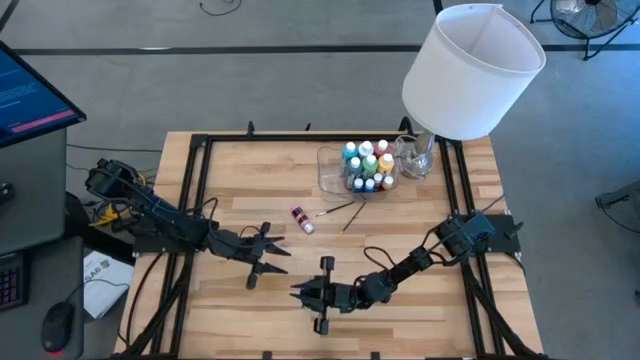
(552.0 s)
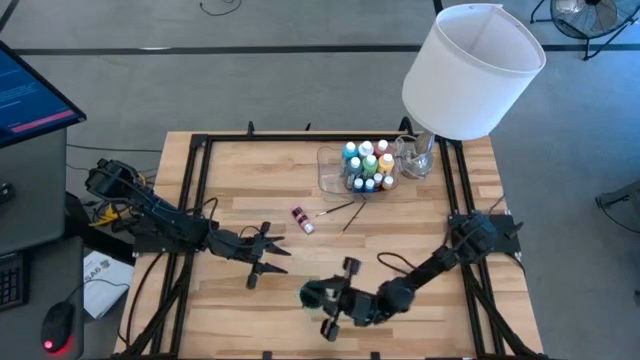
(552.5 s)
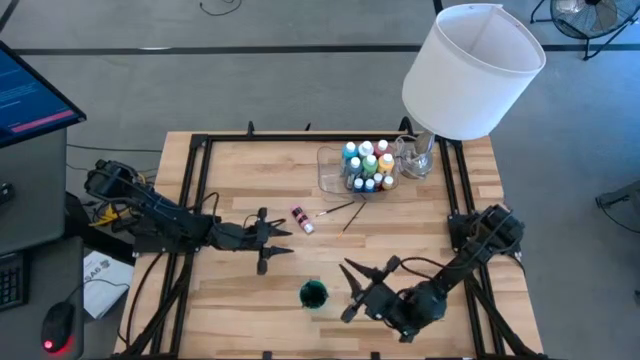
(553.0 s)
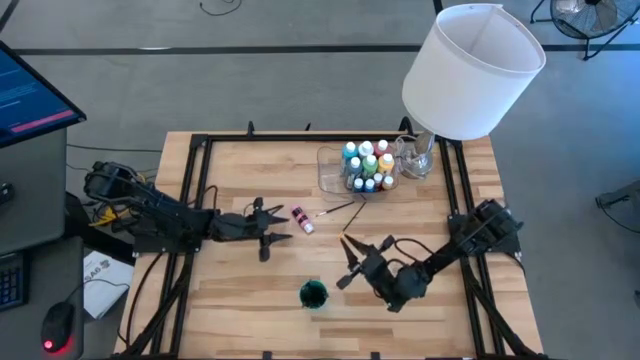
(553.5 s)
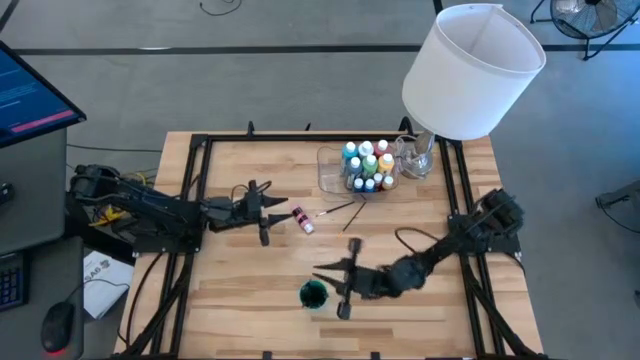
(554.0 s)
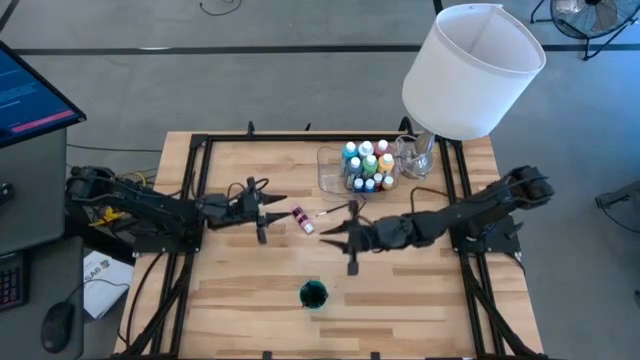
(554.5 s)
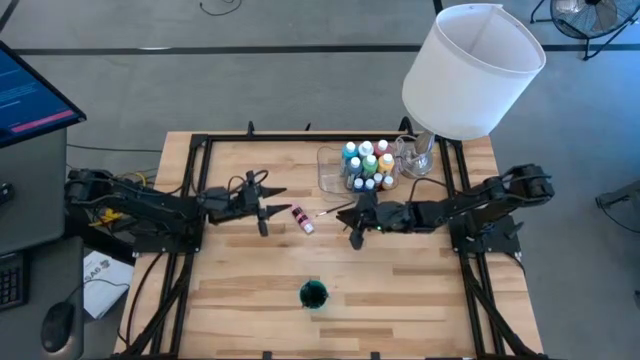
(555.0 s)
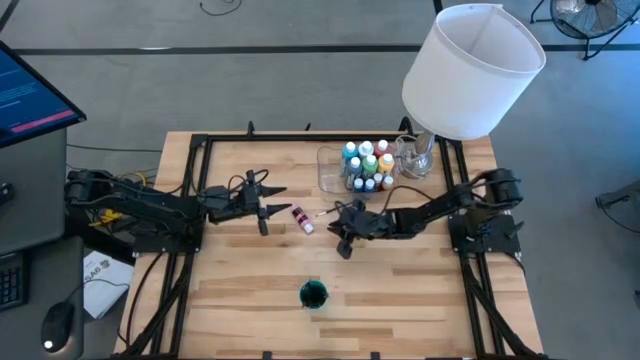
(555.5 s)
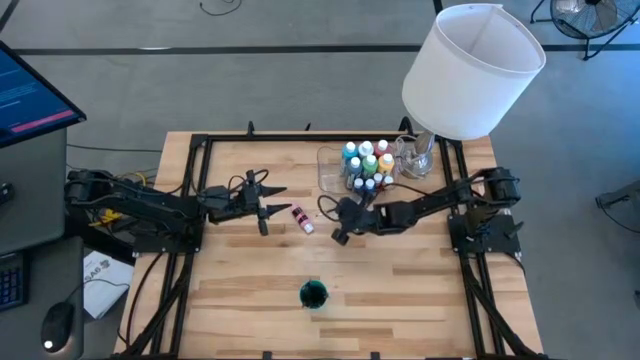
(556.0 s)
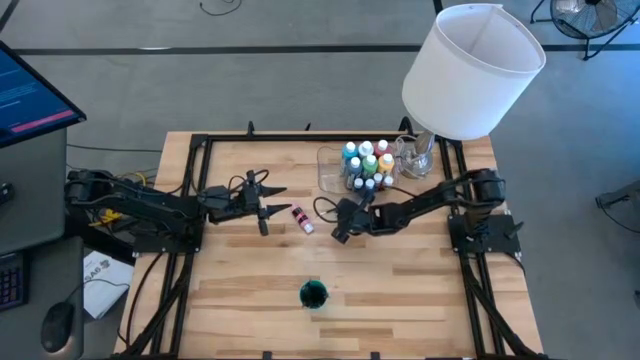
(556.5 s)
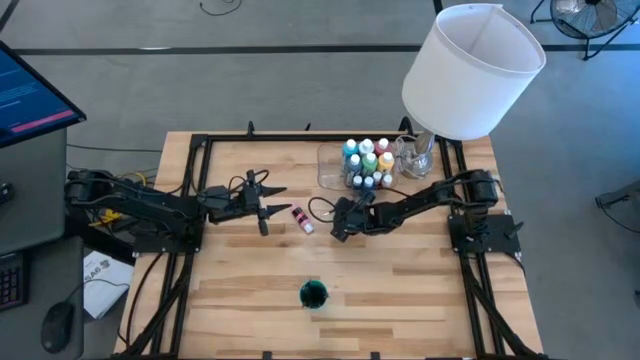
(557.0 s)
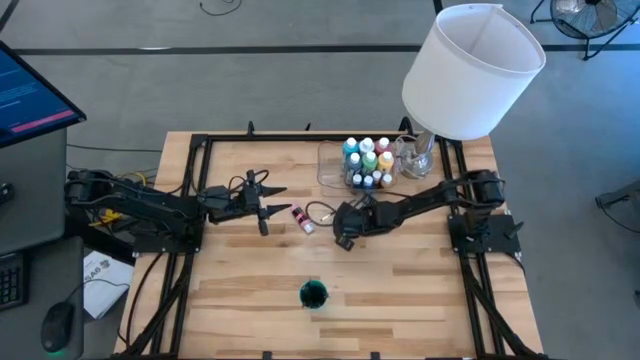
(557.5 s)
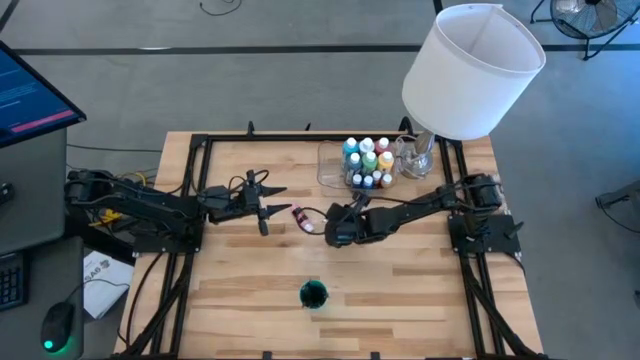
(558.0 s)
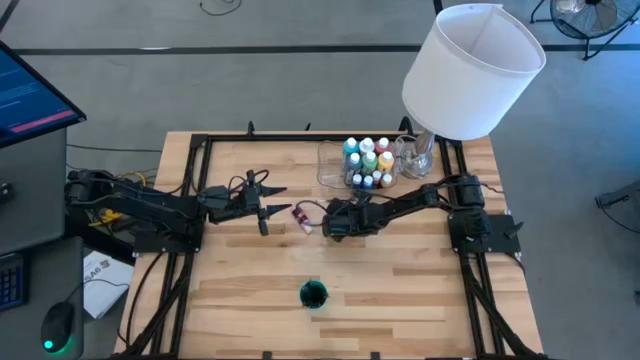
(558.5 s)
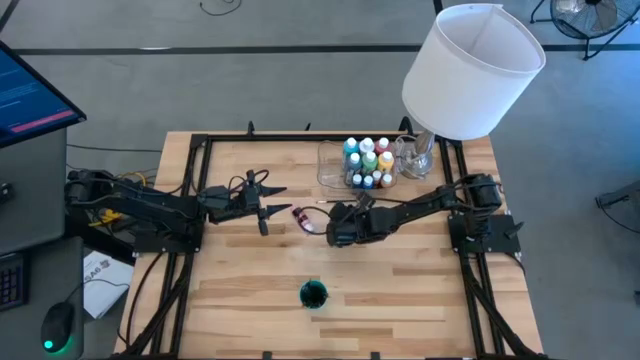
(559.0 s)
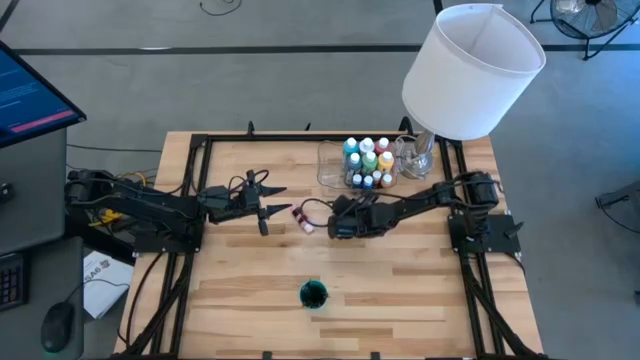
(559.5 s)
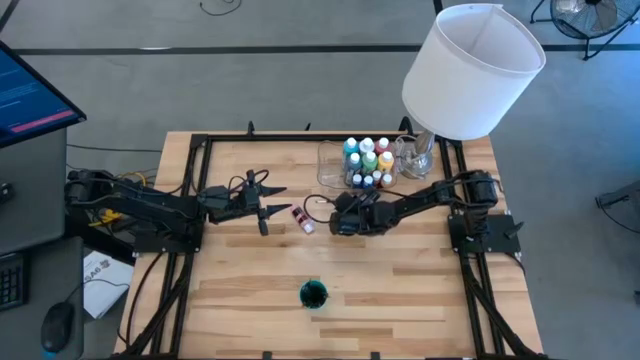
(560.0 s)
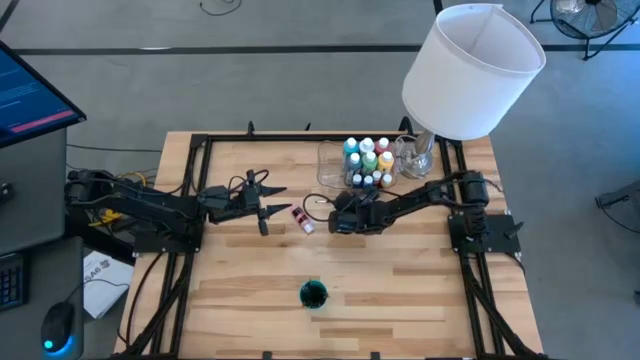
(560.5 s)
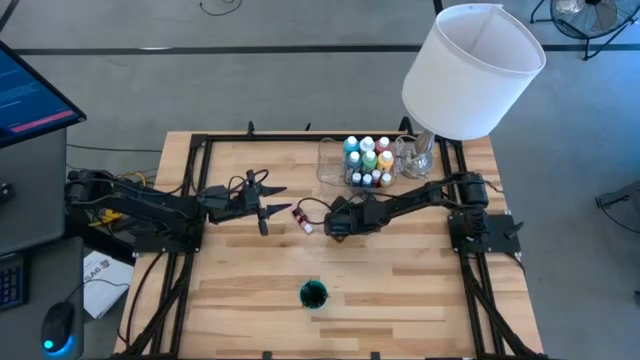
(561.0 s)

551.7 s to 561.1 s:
Task: Pick & Place Paint Supplies
Adjust the silver paintbrush on the table
